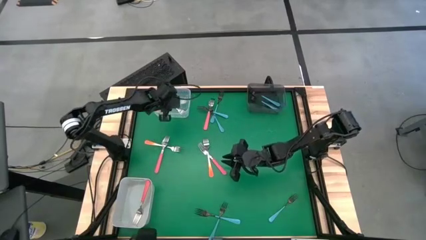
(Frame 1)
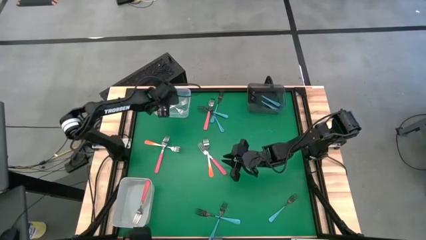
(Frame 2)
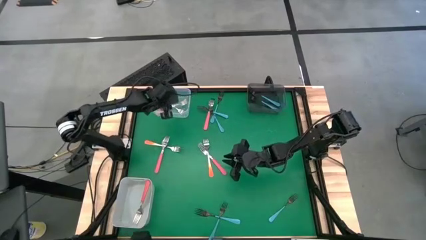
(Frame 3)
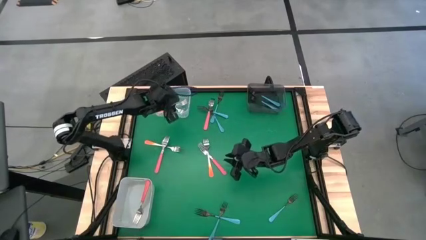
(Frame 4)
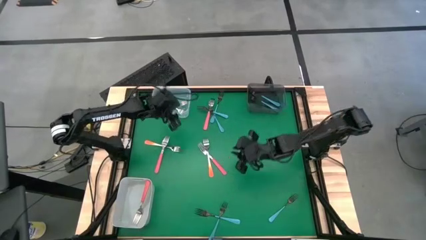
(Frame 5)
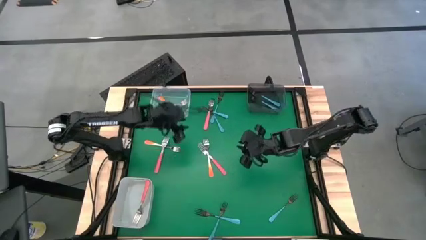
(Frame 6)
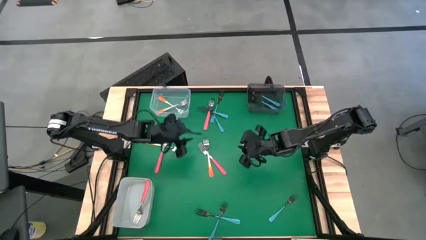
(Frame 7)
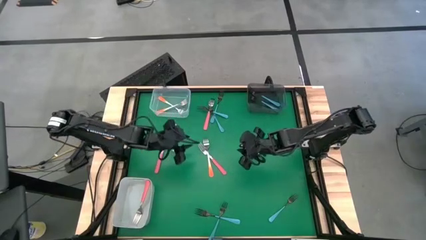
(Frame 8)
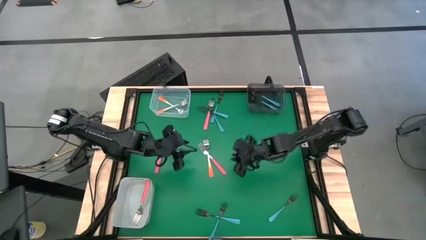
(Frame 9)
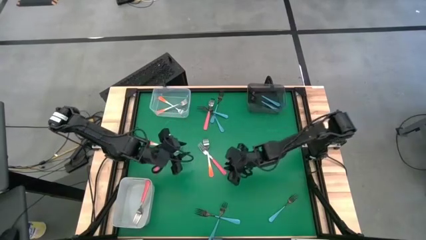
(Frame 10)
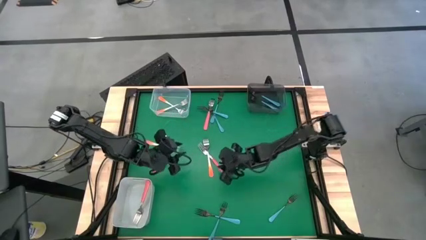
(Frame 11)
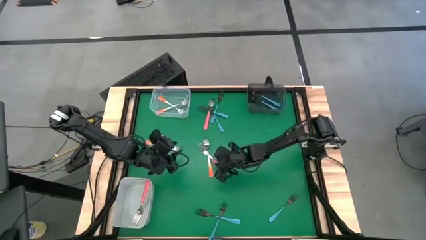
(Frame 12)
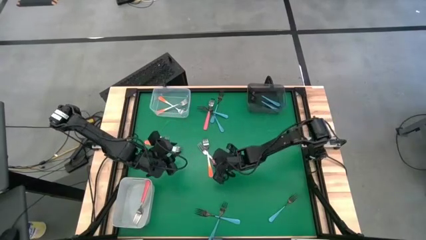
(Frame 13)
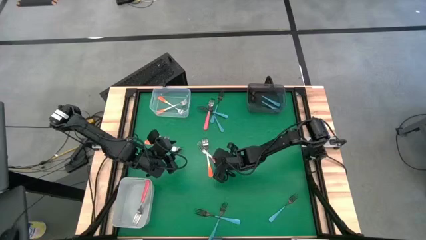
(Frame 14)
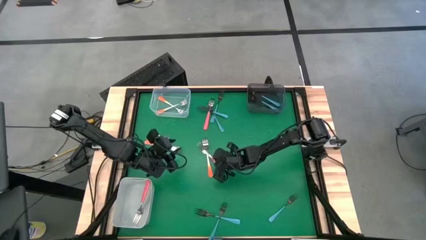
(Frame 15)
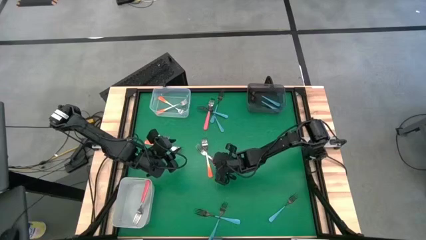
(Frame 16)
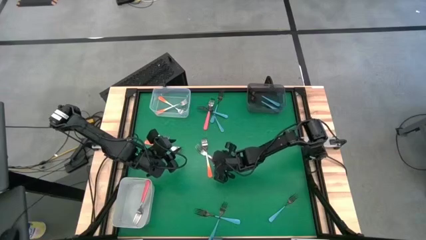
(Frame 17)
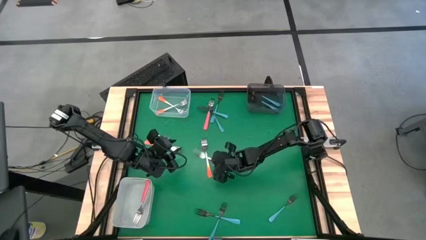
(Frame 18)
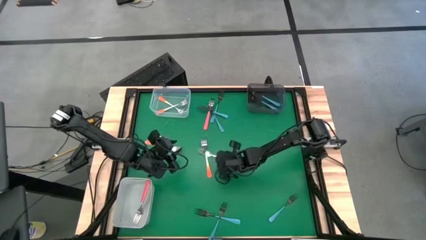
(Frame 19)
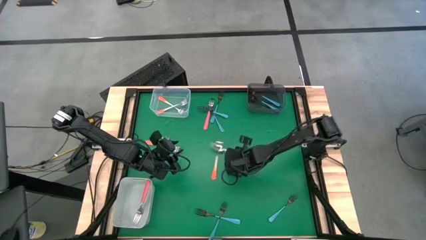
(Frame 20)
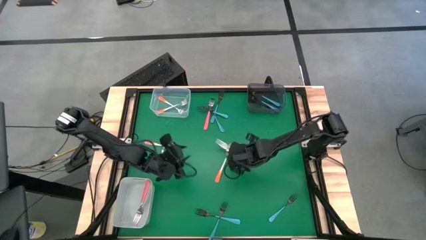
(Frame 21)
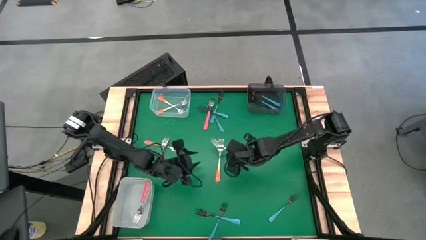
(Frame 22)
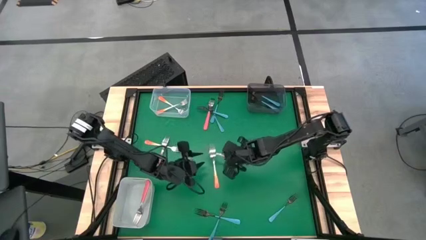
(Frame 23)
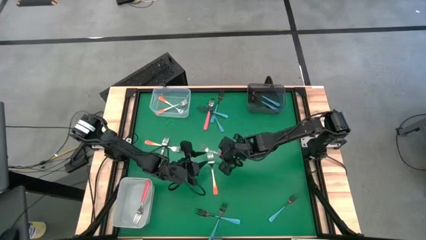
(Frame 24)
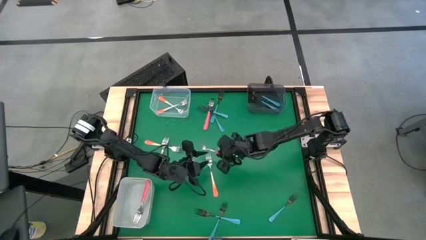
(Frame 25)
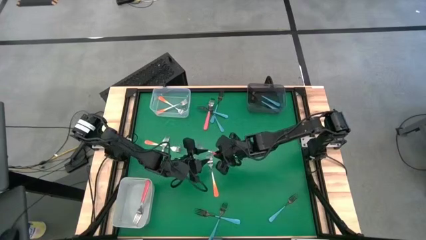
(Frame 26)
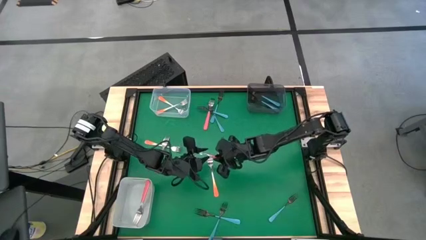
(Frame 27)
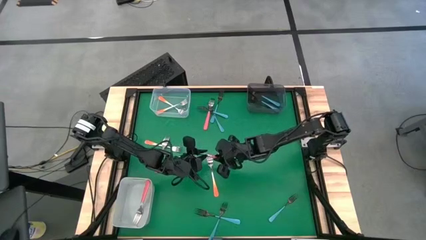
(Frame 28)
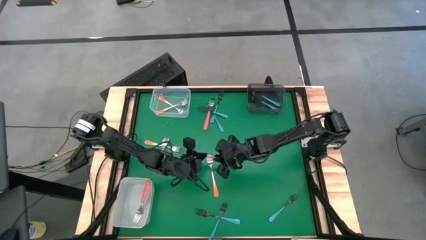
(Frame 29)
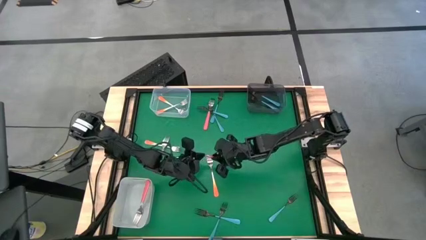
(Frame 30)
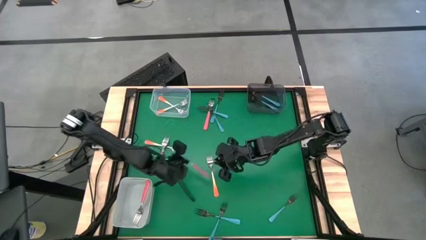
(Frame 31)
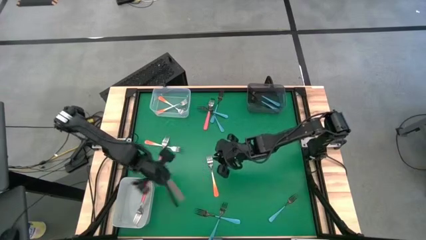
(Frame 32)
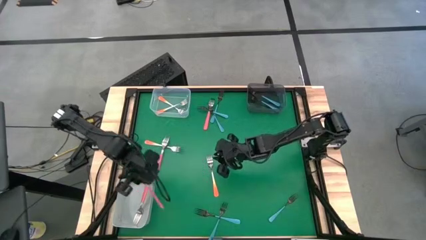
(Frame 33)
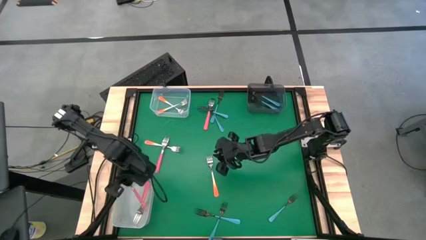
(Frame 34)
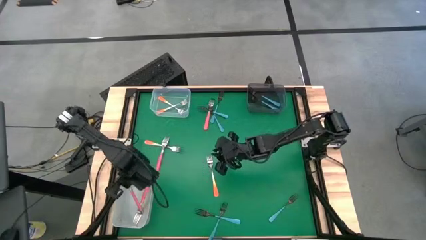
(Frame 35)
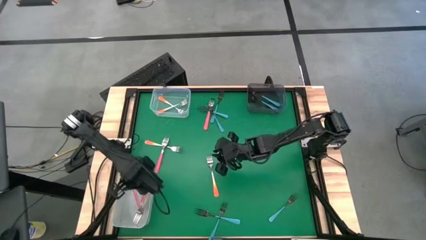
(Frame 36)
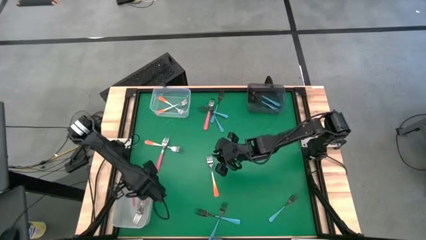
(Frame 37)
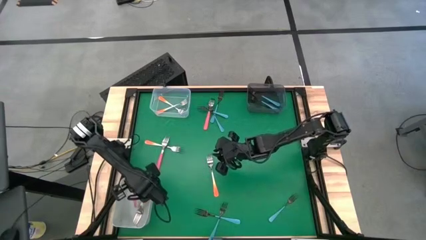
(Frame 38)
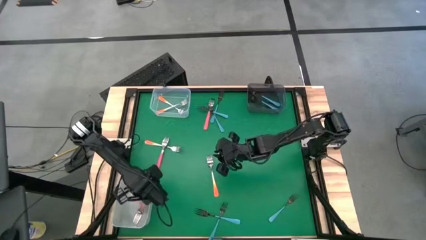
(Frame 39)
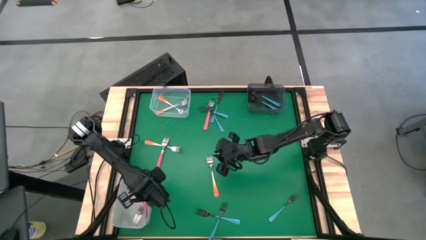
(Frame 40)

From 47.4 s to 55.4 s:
Task: Sort silverware by color (type)
Put the pink fork into the white bin

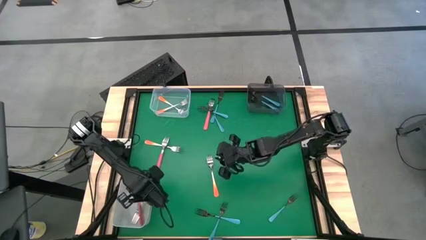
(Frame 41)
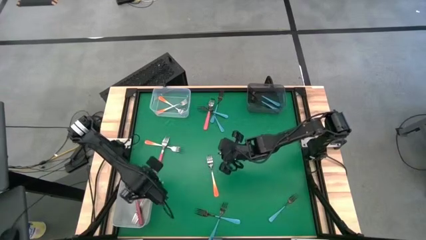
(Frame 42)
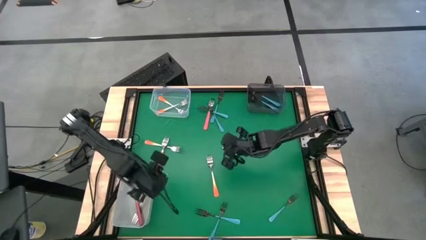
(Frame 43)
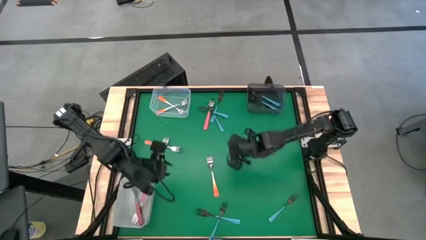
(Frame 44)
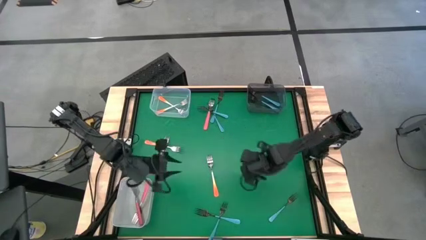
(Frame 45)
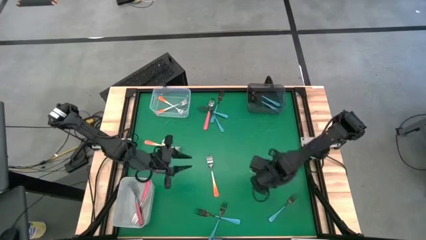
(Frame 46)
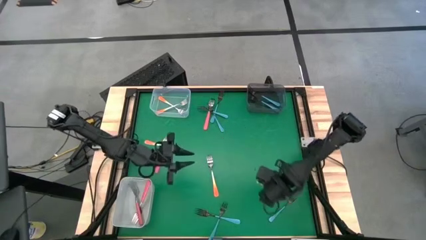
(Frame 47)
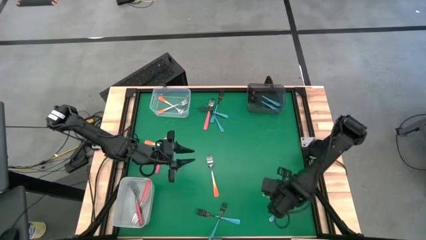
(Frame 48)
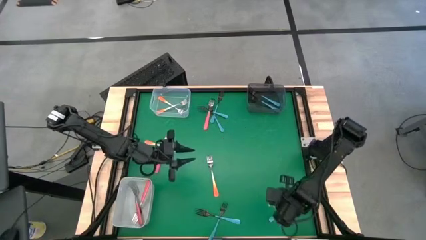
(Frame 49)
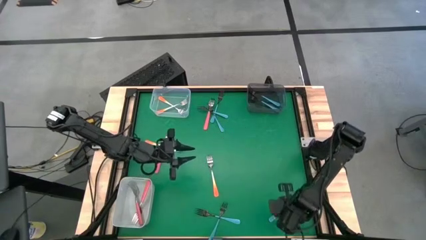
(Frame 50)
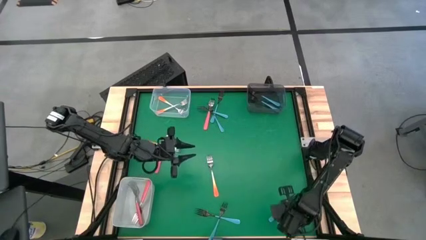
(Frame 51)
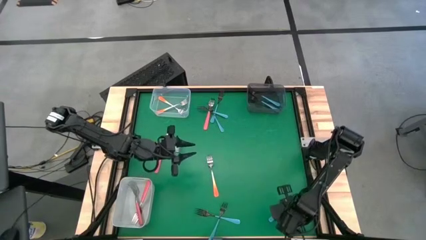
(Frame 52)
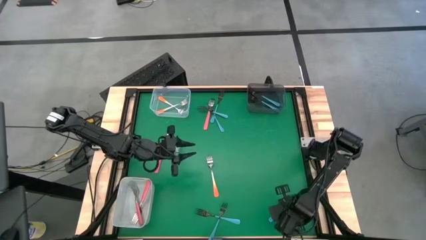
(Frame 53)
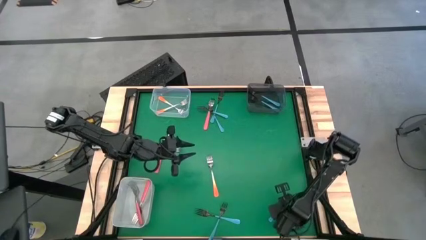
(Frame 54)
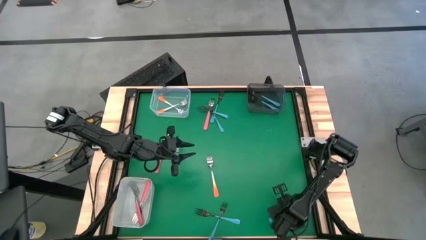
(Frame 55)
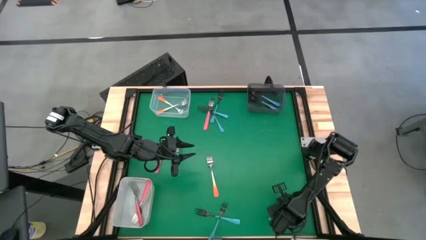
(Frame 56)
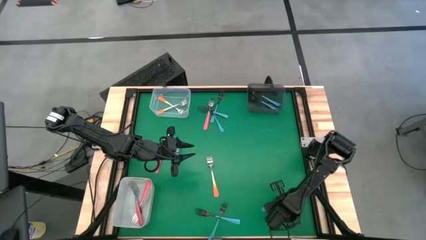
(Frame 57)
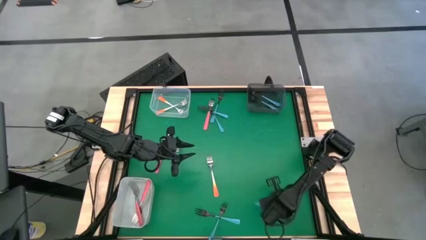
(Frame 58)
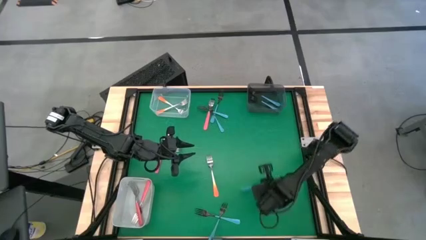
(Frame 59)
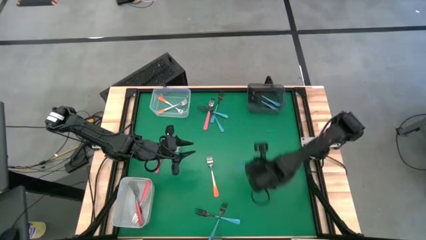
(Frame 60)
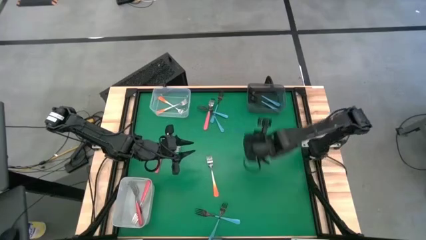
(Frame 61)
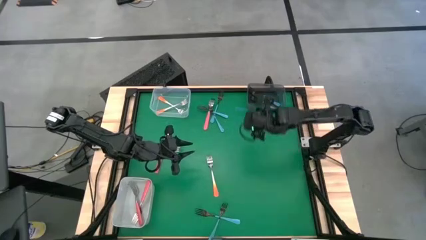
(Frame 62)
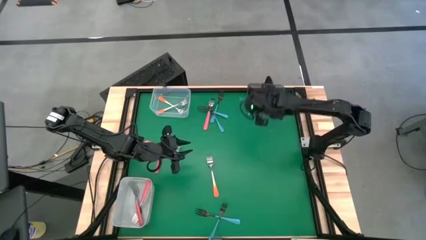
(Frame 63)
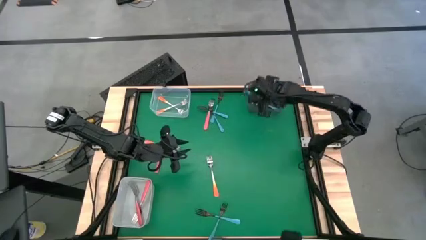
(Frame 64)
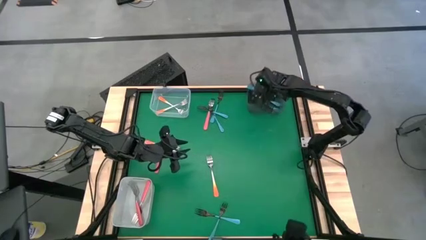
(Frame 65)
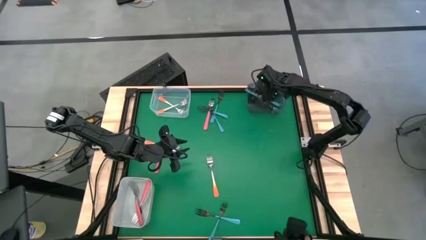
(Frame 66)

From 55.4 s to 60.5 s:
Put the blue fork into the black bin

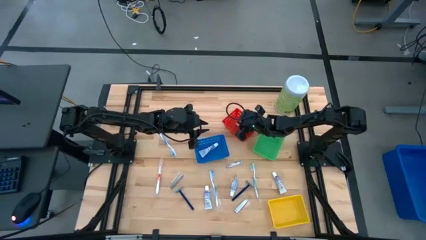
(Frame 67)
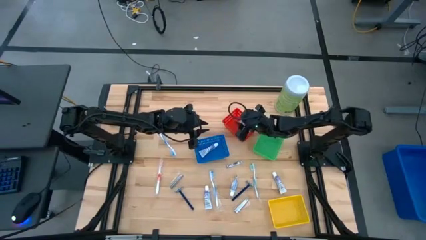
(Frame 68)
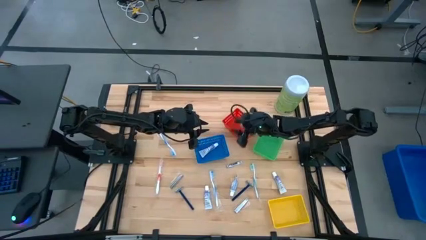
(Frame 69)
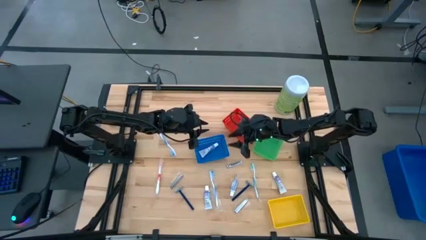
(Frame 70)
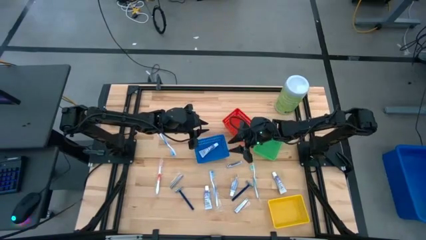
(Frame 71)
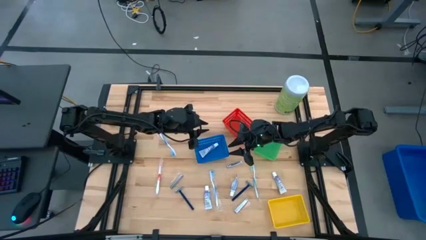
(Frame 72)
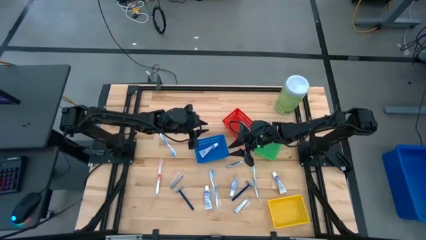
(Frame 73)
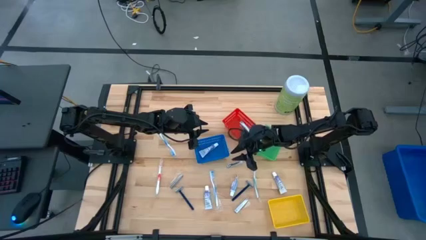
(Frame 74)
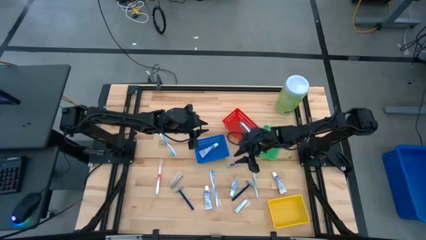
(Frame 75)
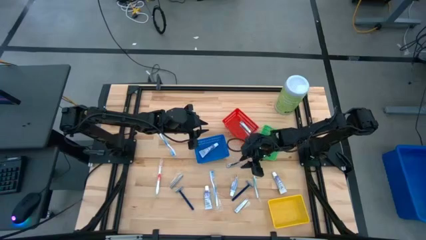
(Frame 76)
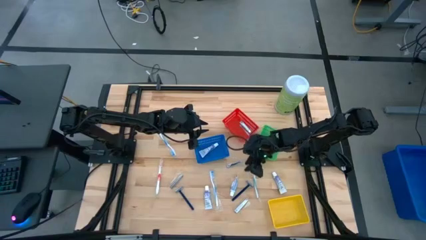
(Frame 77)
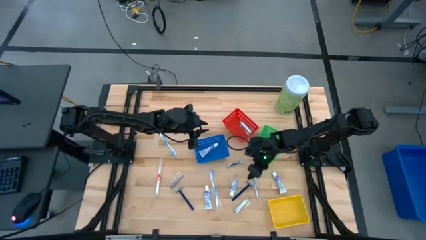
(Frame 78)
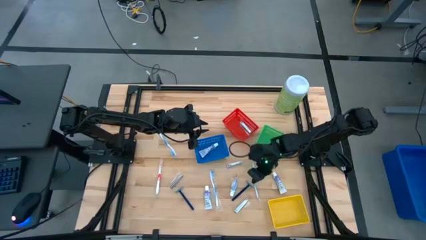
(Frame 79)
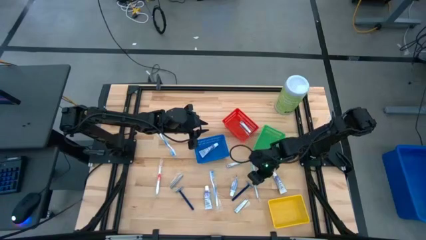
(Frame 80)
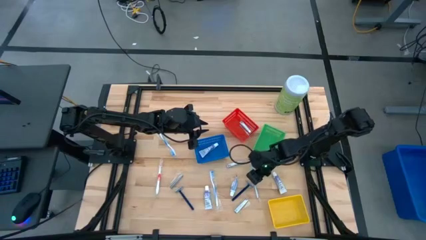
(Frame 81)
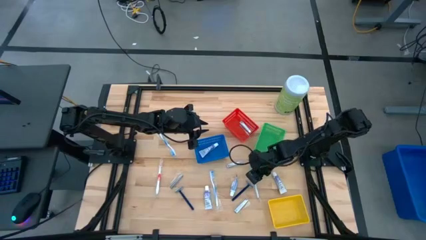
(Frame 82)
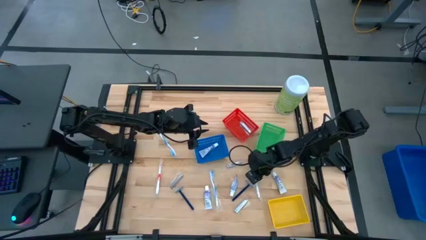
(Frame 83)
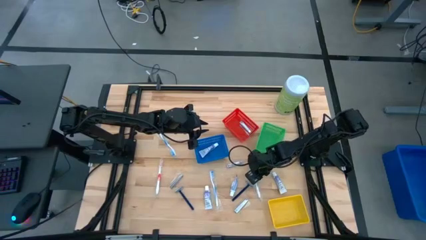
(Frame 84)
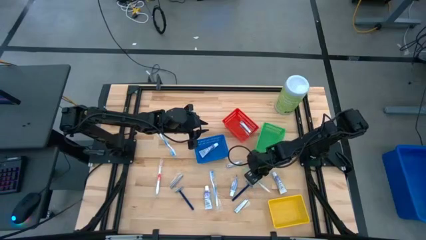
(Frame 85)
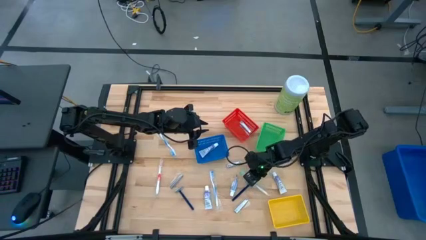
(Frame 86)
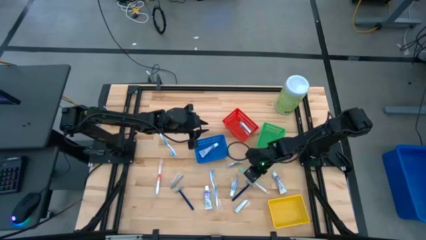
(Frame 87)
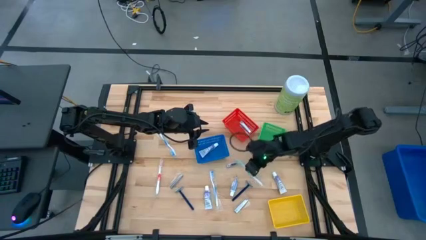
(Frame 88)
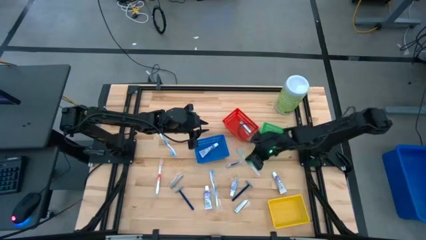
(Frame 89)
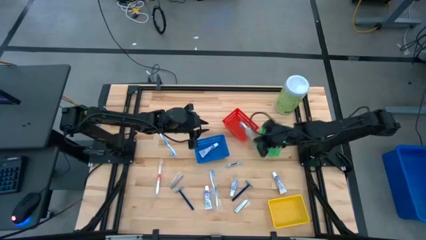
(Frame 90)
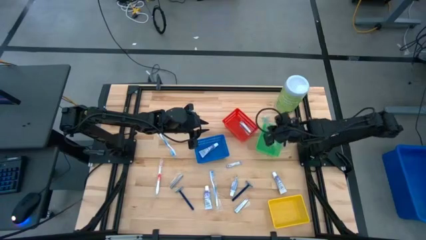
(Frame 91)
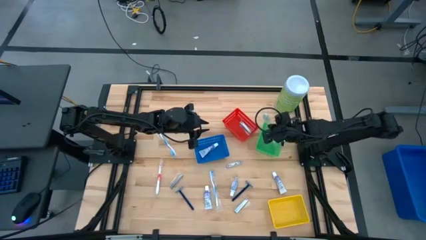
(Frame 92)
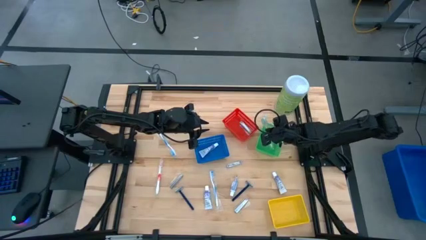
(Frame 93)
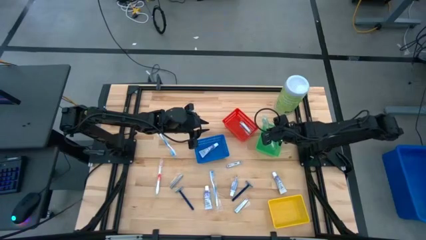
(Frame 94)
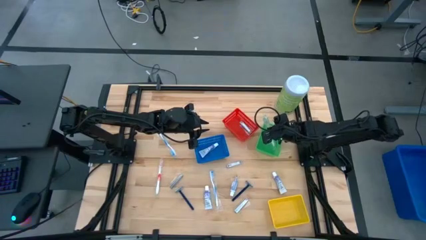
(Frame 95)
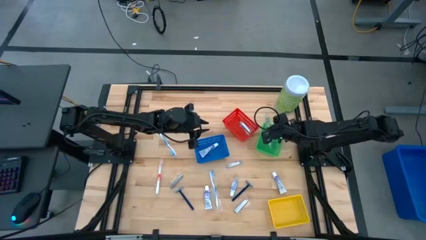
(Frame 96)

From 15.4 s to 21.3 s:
Task: Pick & Place Travel size toiletries
Put the green toothbrush into the green bin
